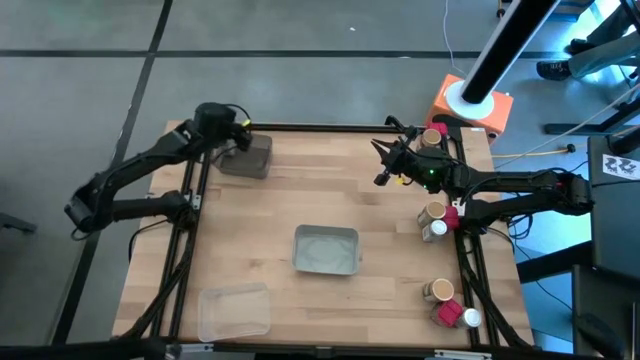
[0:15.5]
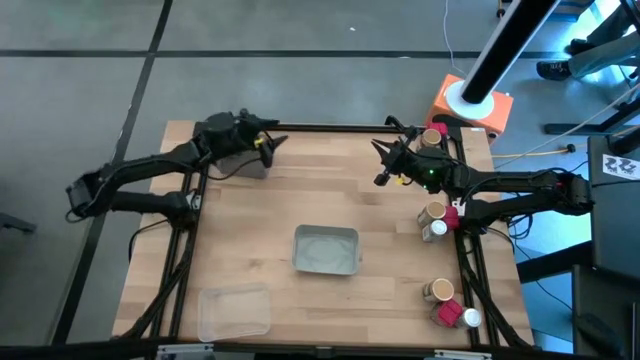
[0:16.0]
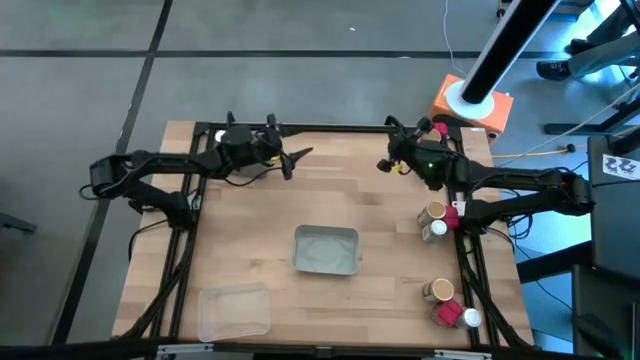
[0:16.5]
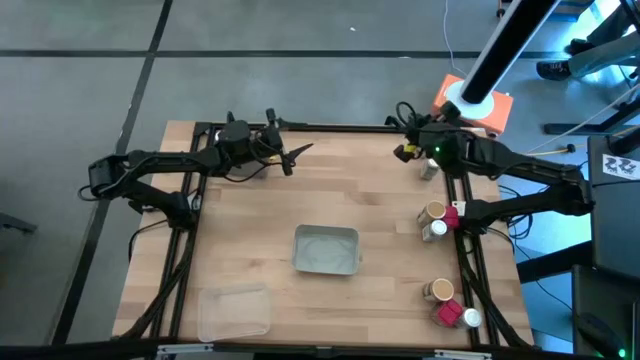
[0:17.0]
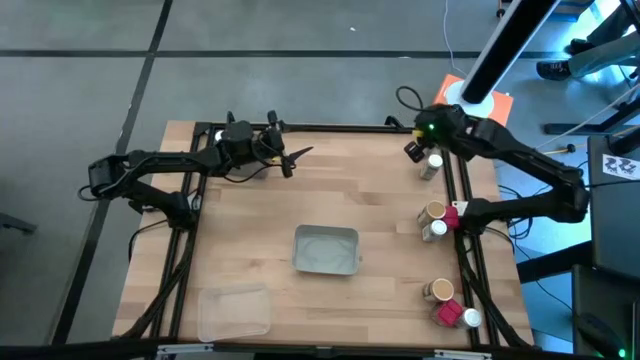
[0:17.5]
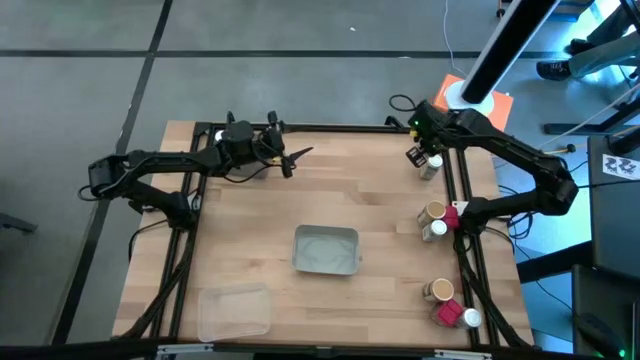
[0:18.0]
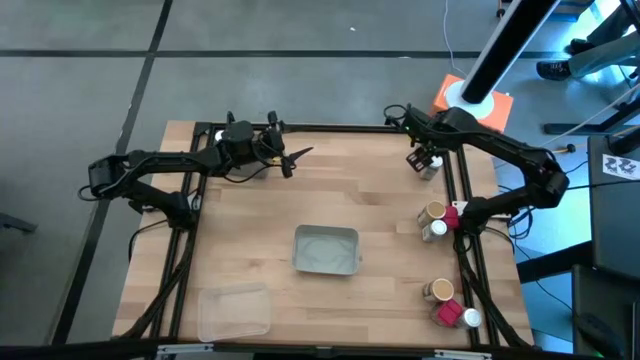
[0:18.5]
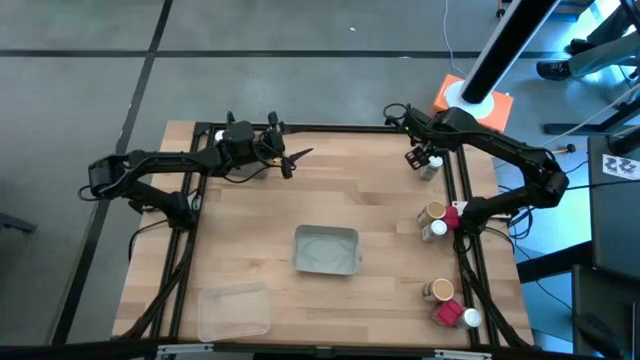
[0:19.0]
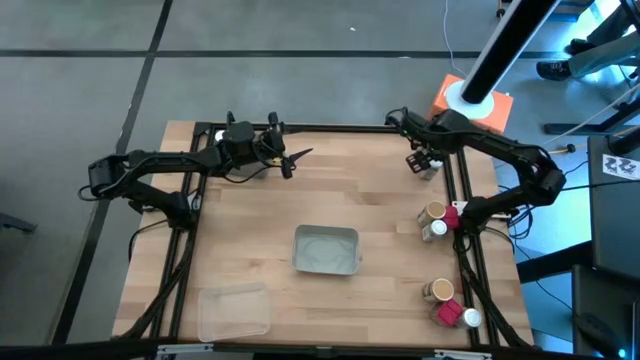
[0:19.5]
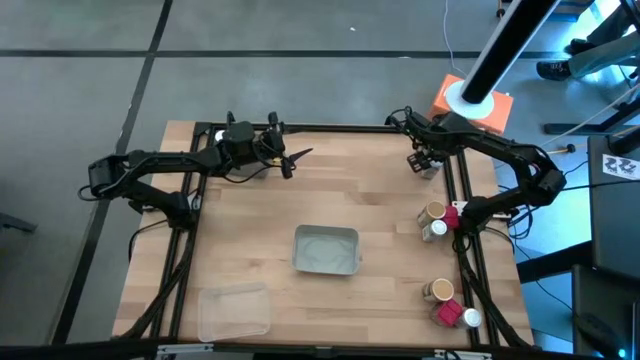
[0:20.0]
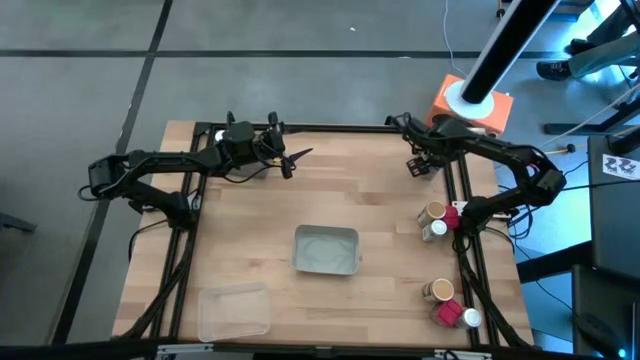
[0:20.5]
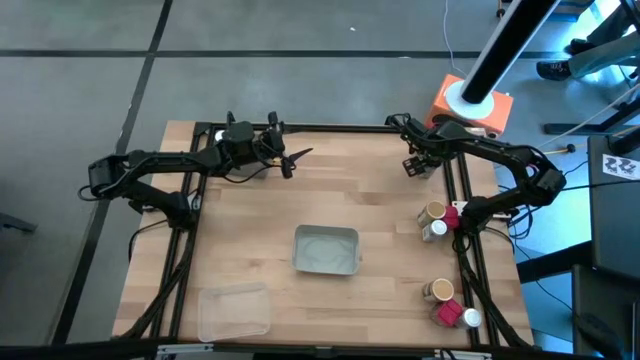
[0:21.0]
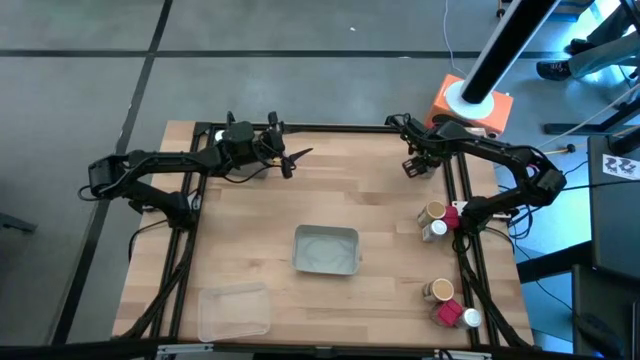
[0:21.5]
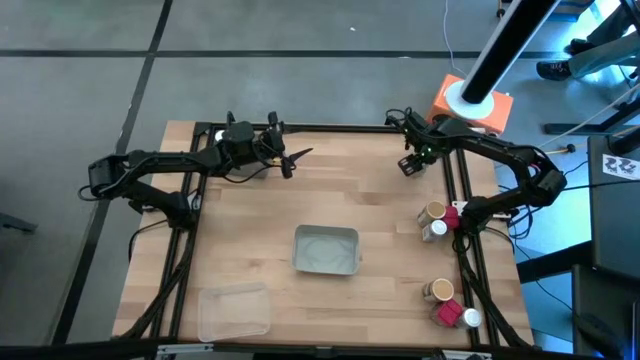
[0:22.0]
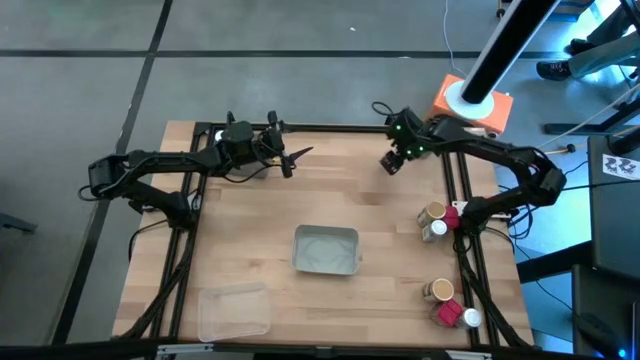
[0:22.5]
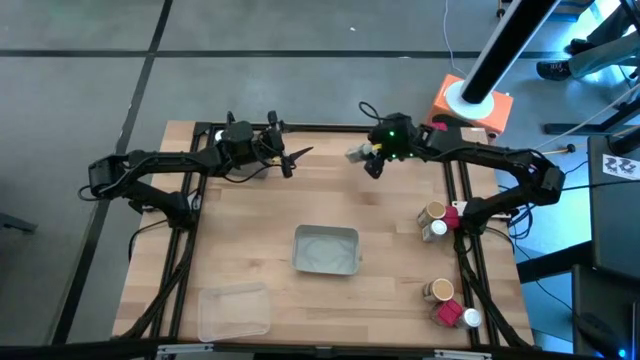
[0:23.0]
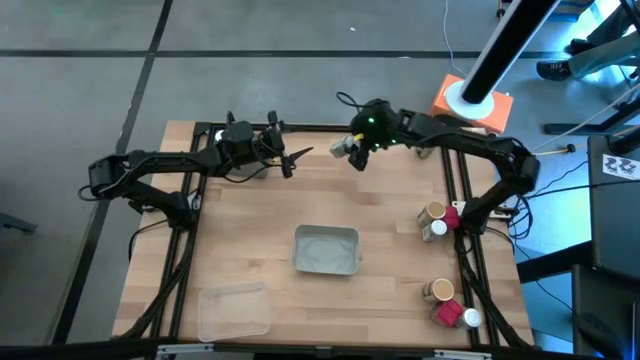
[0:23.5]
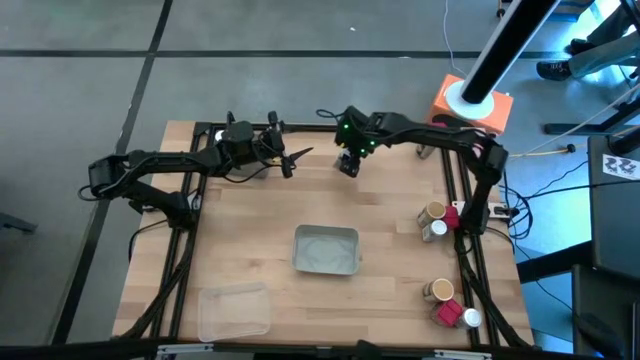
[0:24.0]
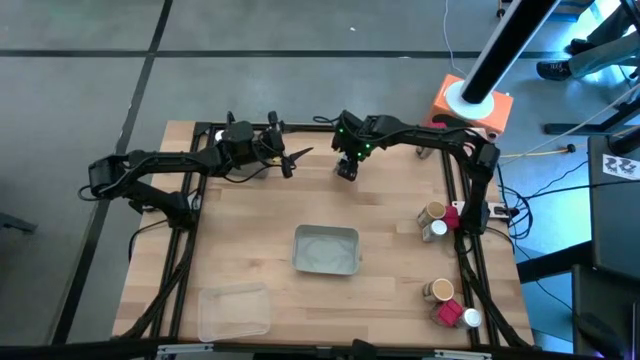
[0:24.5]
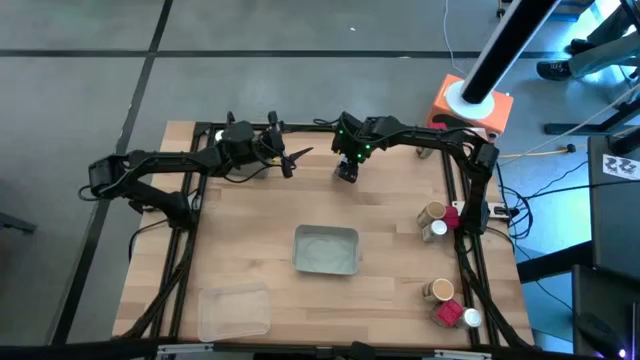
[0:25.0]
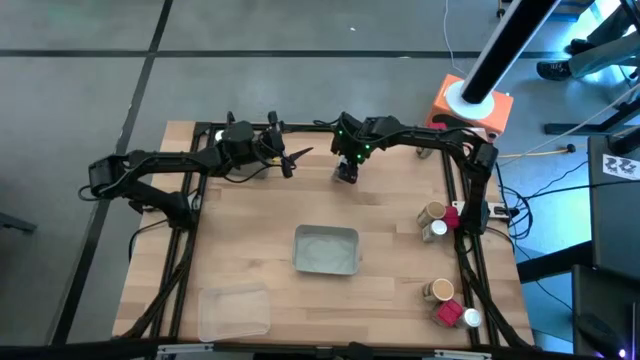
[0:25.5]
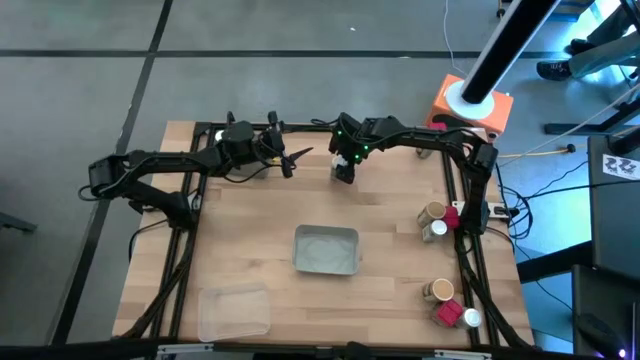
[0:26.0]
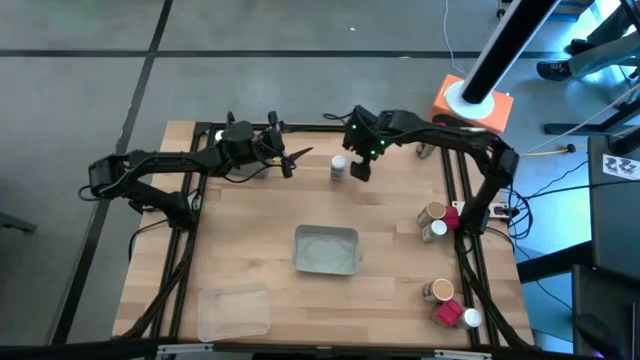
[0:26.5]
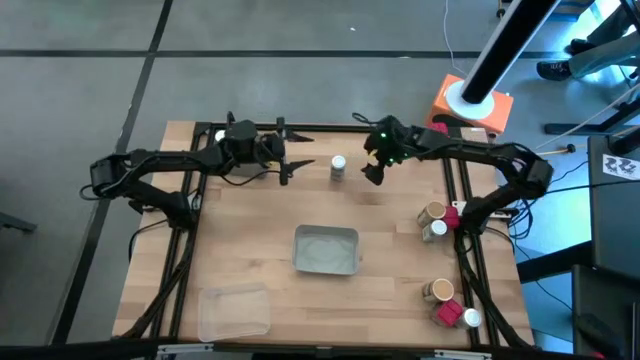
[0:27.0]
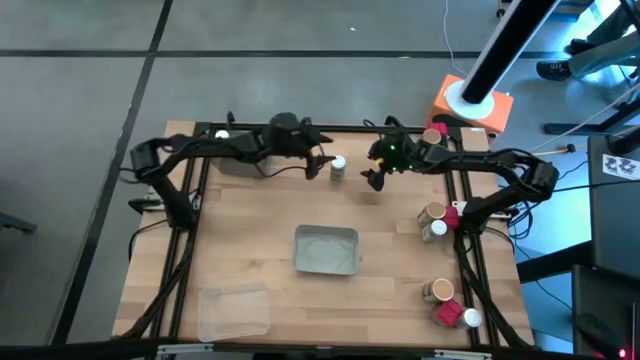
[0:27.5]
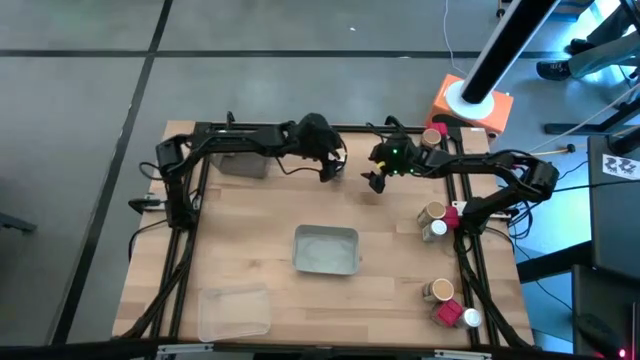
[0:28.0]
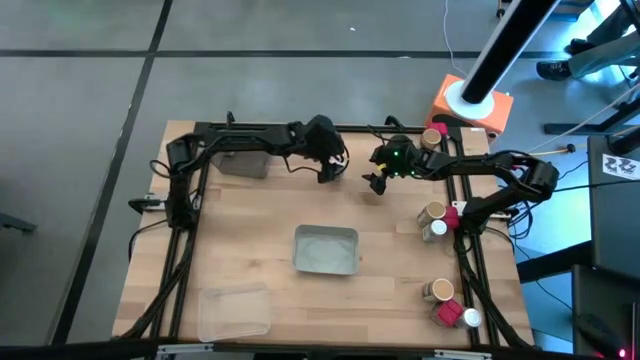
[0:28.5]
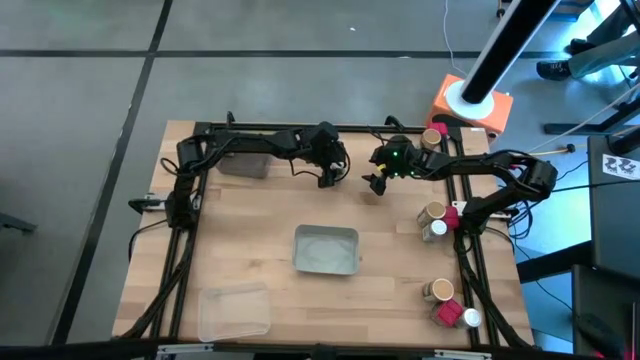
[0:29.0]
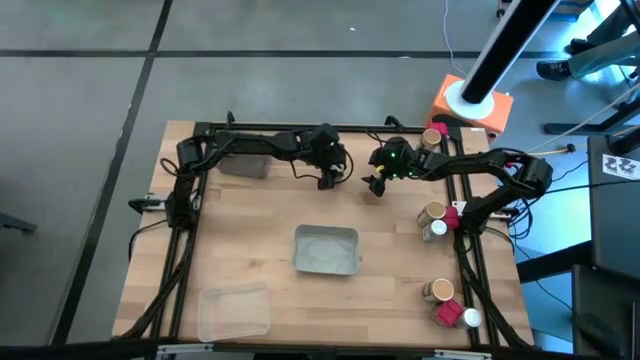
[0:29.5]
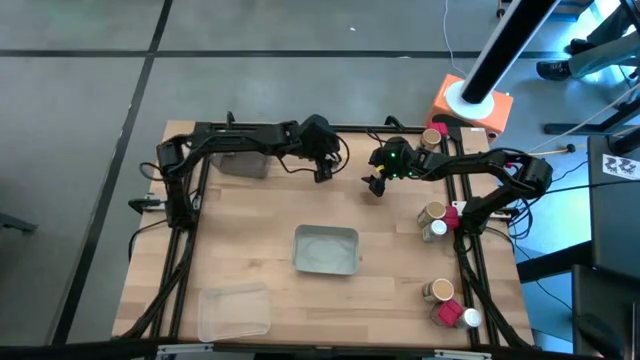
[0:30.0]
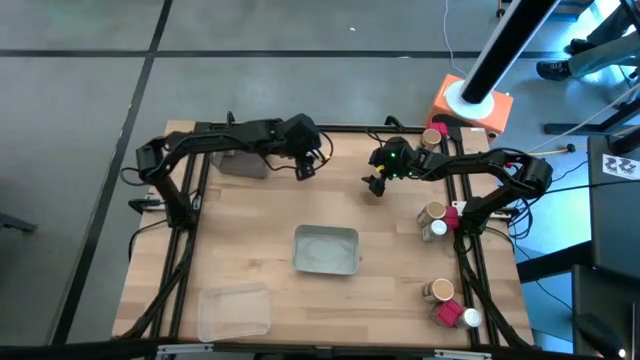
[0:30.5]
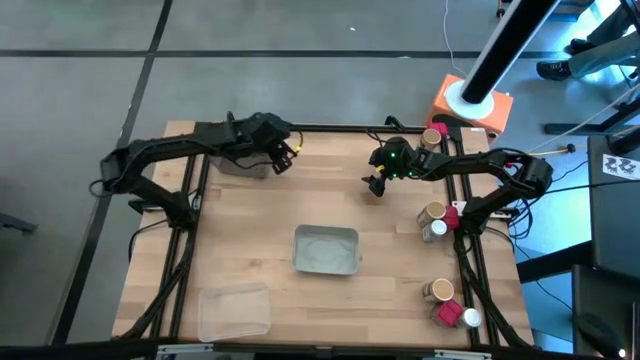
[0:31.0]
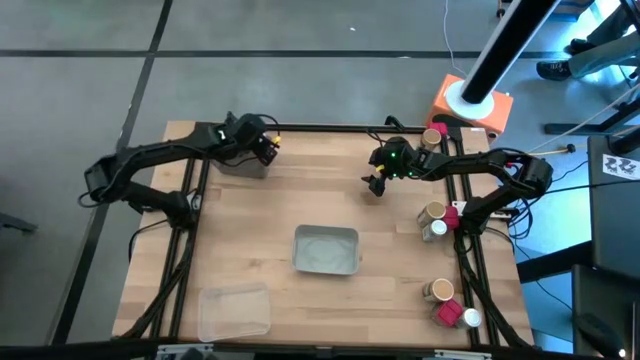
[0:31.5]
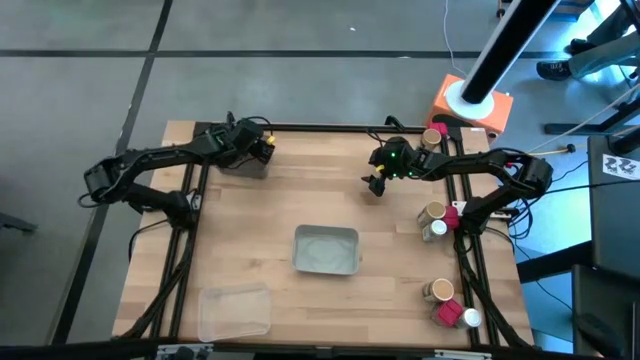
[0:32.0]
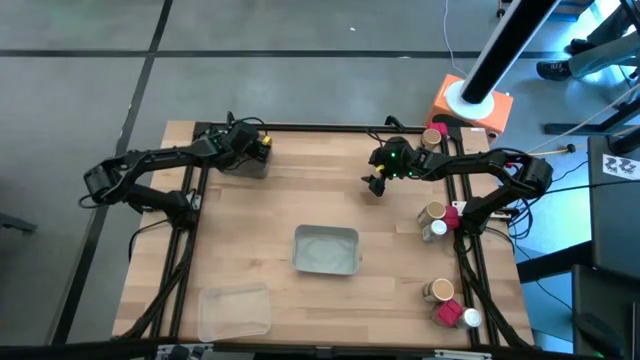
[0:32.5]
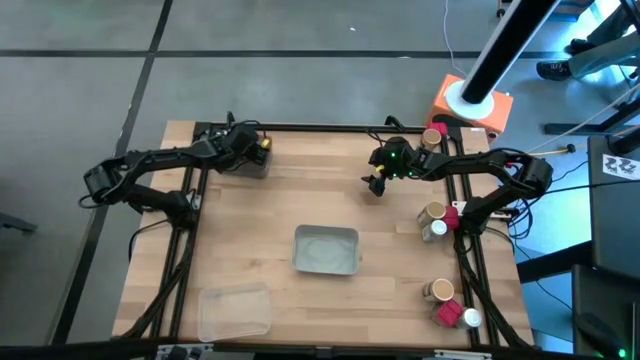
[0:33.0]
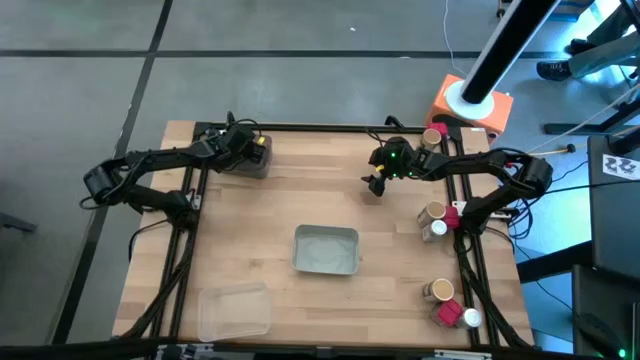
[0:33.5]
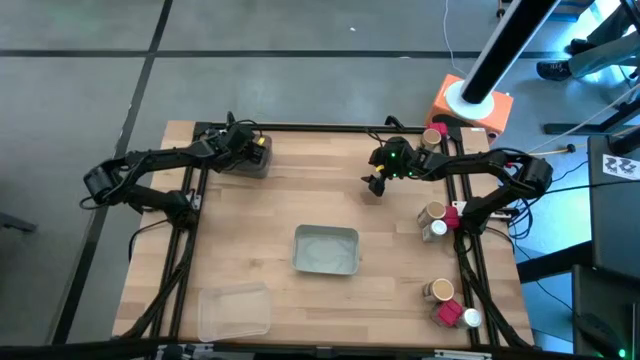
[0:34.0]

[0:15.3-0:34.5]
Task: Sort spices by type
Put the top white seasoning bottle into the black bin

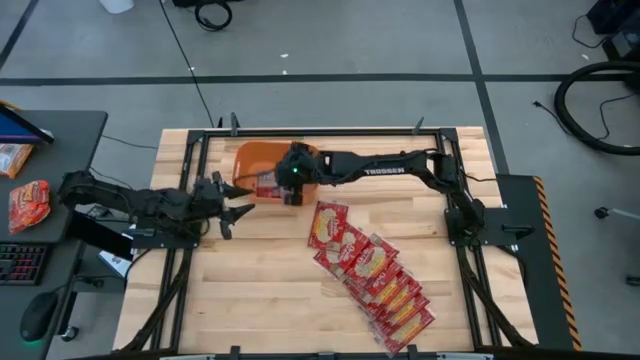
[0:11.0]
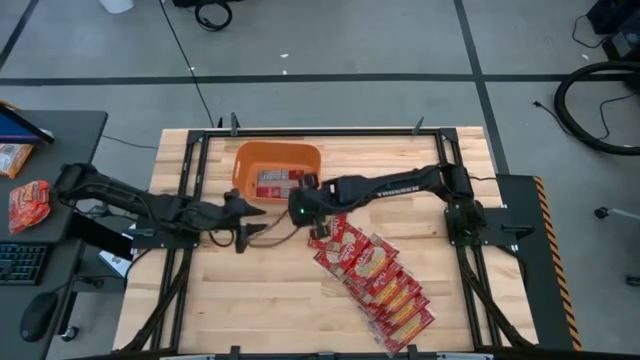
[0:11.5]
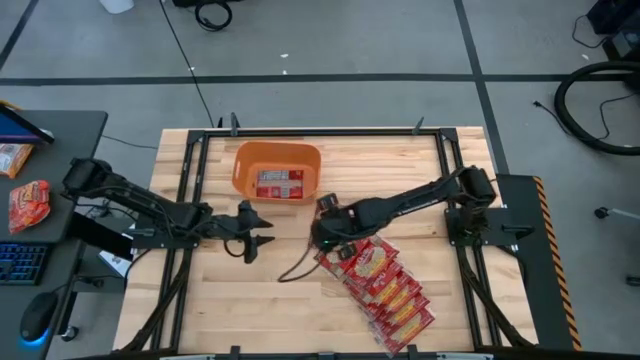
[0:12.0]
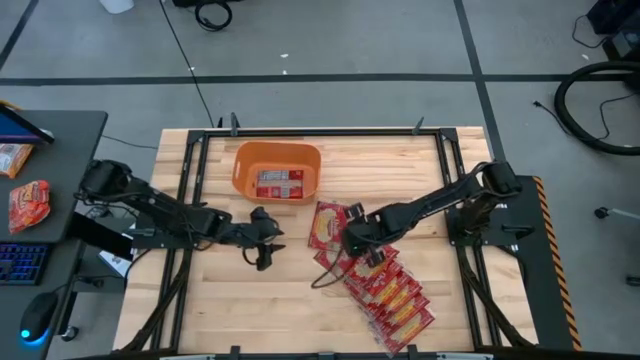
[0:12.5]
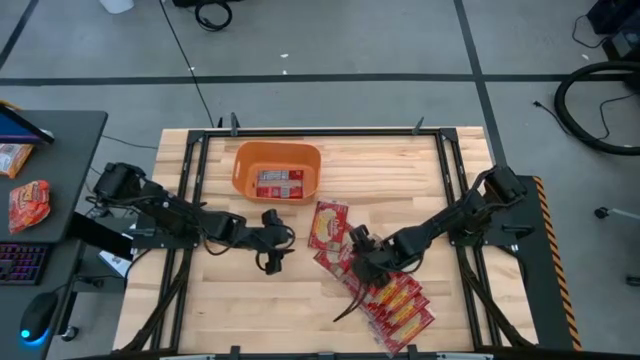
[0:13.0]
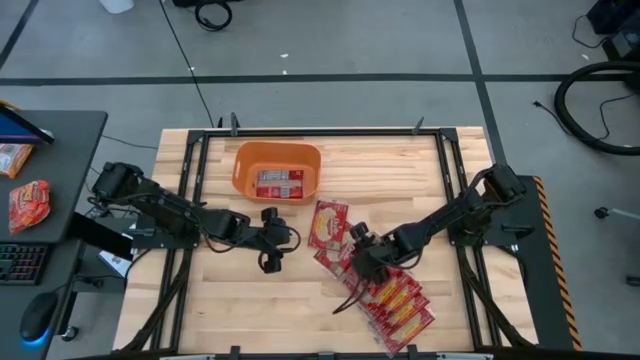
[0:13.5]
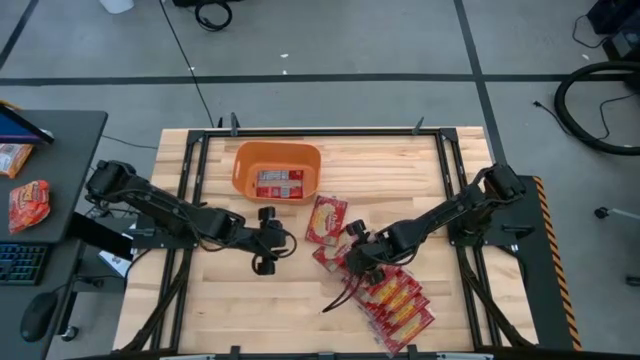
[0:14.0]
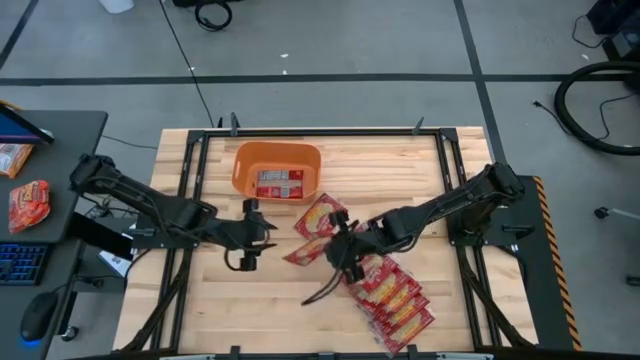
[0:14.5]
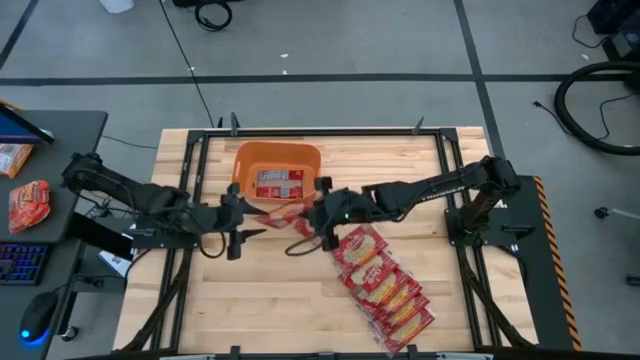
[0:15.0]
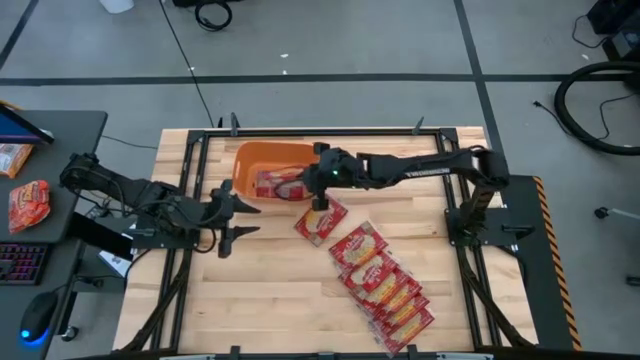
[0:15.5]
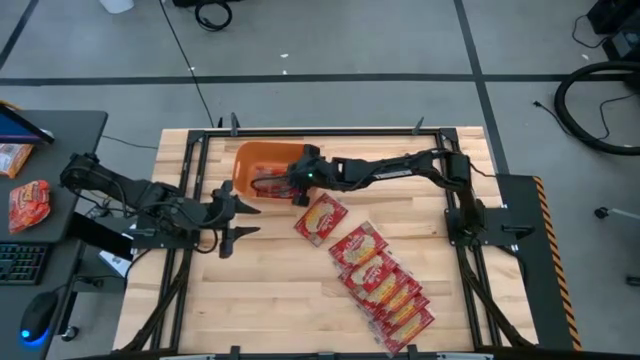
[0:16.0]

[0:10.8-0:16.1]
Task: Sort popcorn bags into baskets
Put the popcorn bag into the orange bin
